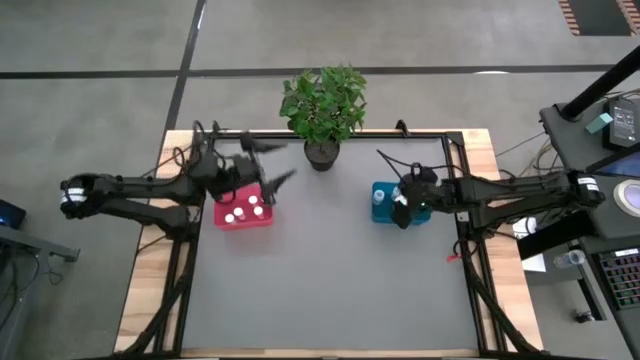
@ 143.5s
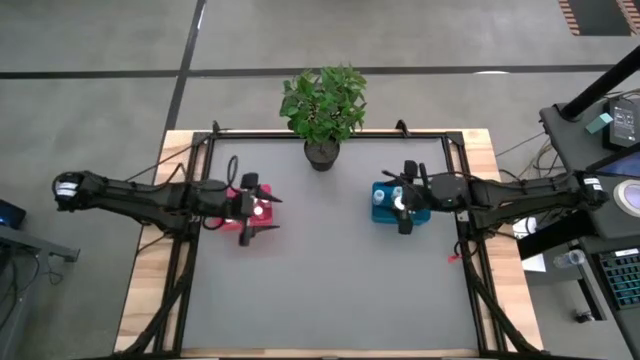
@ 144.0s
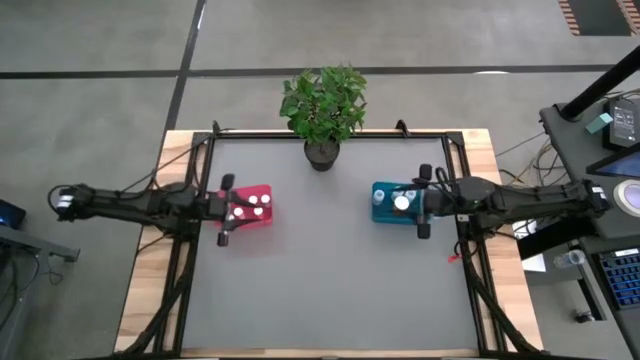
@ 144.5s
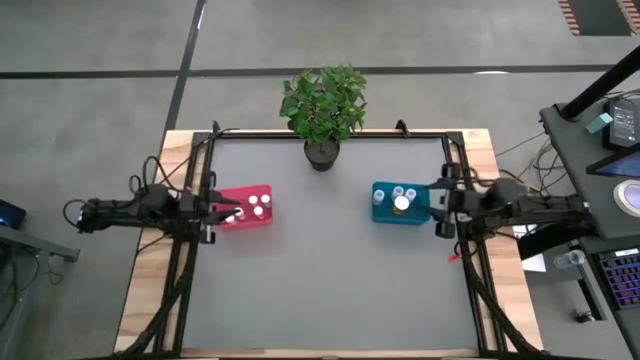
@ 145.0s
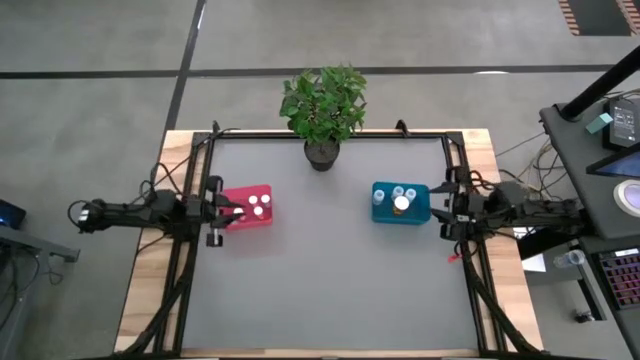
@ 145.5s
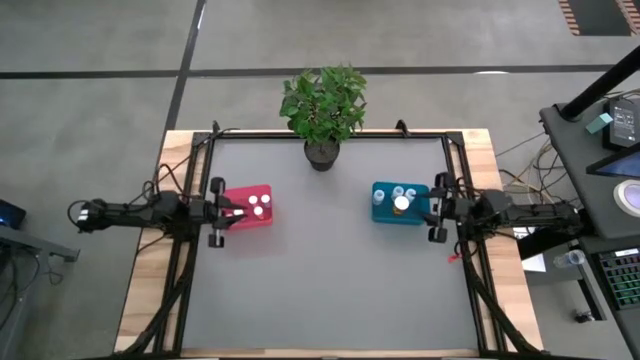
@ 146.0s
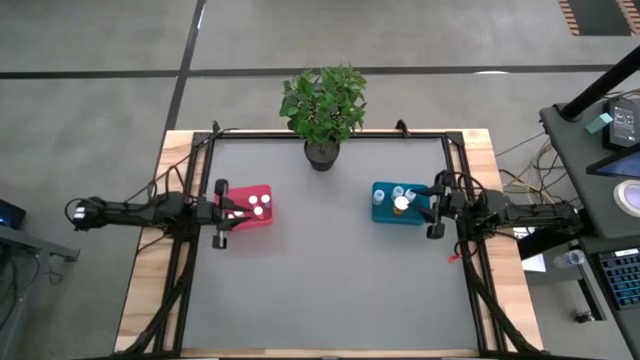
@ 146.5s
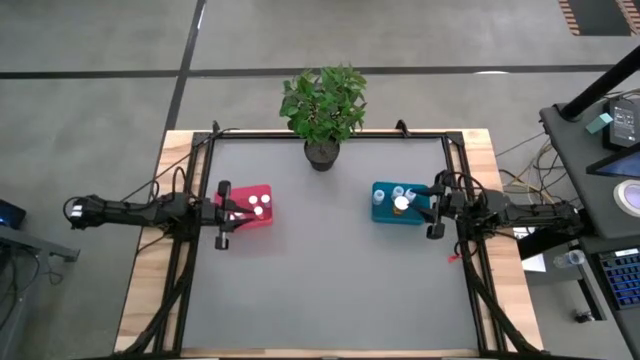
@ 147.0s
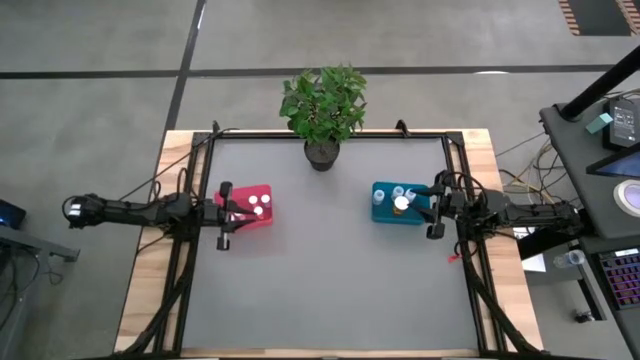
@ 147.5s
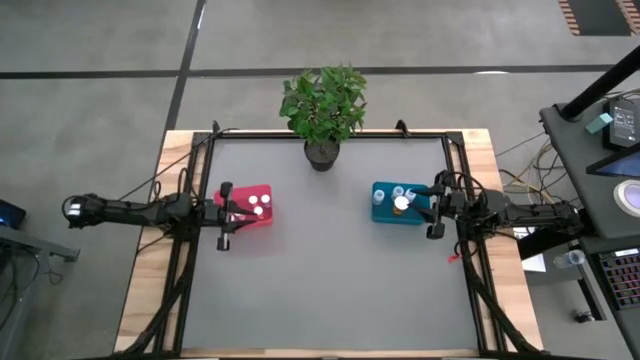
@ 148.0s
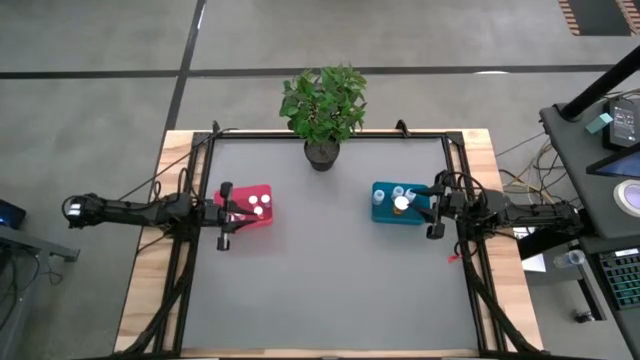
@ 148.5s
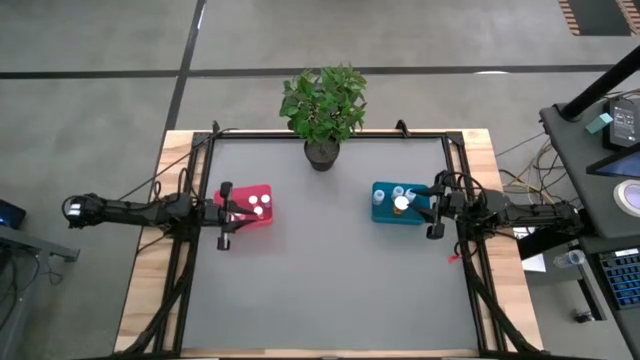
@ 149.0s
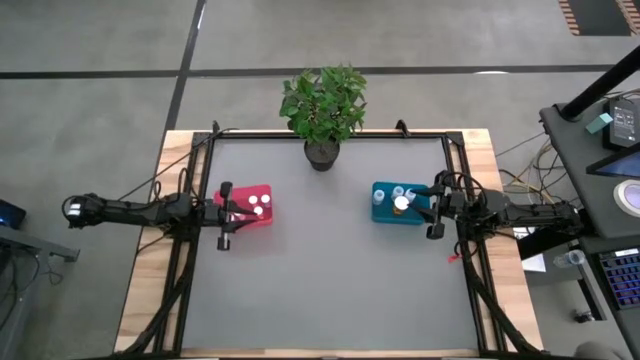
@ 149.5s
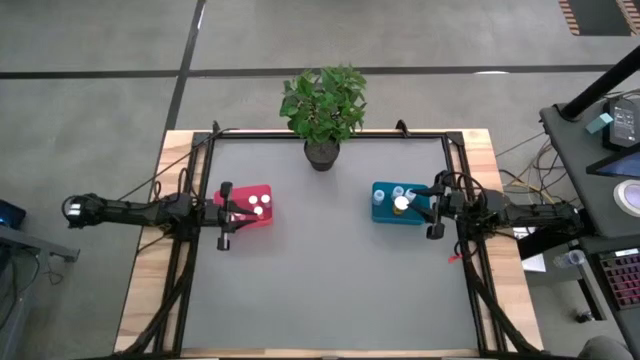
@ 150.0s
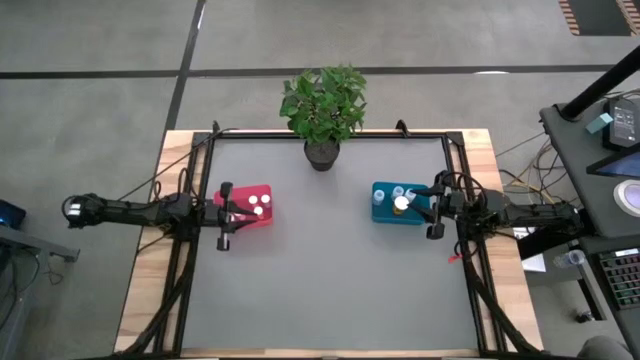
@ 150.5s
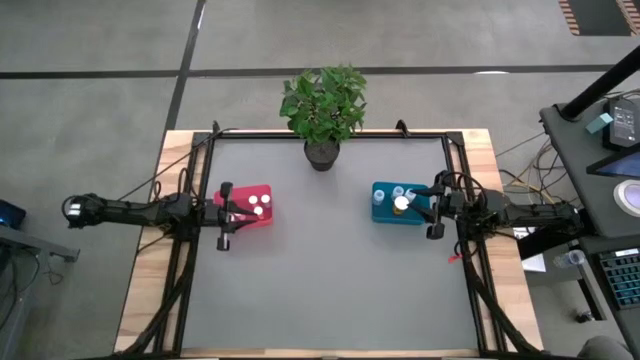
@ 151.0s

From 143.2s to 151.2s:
Task: Pick and place medicine bottles into bin by pill shape (circle, oval)
Return to Home Position

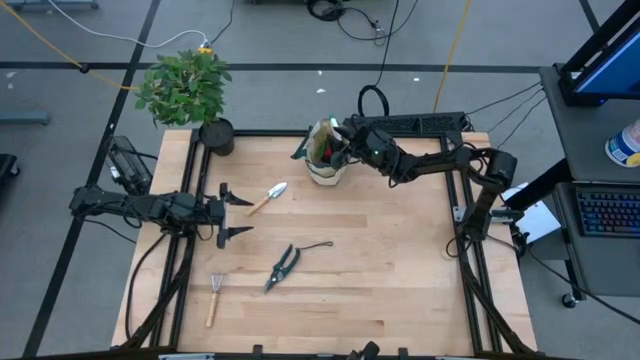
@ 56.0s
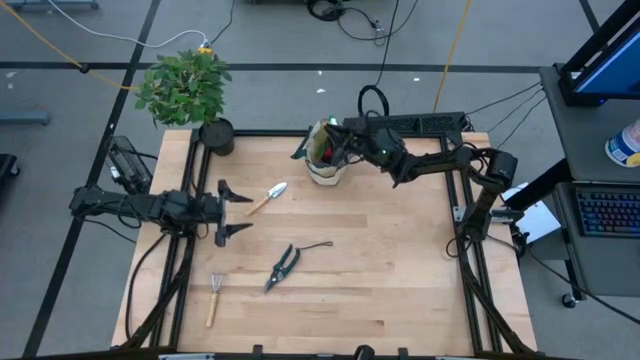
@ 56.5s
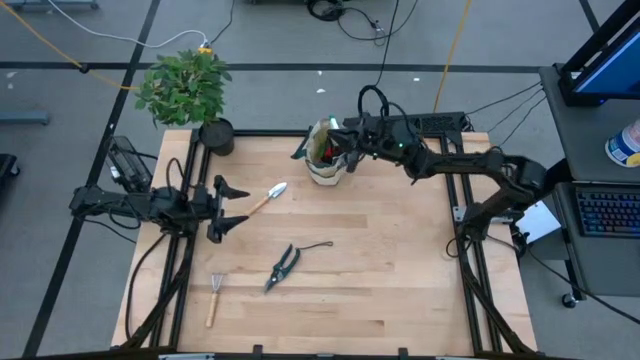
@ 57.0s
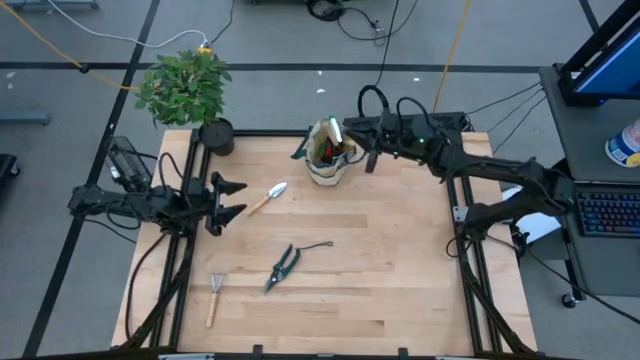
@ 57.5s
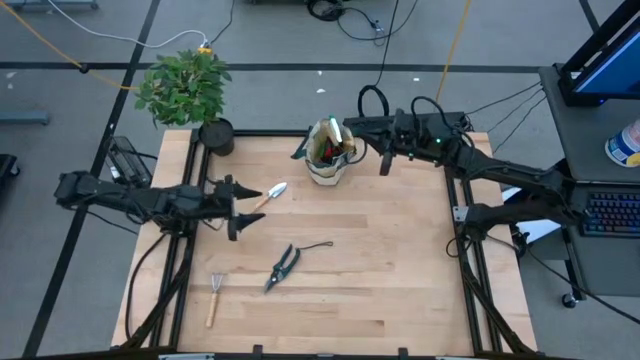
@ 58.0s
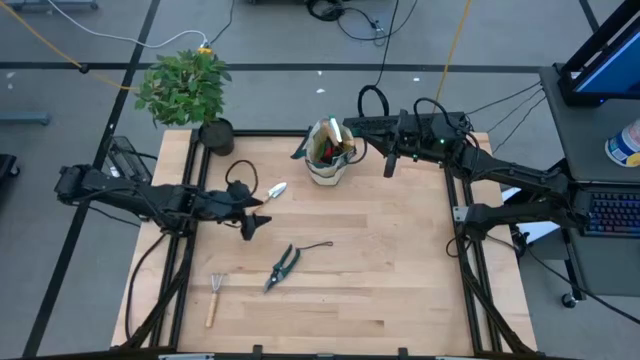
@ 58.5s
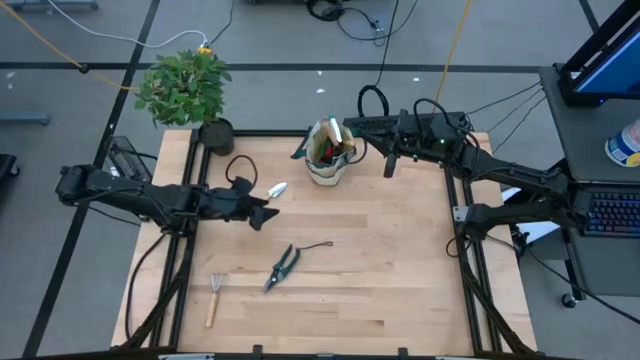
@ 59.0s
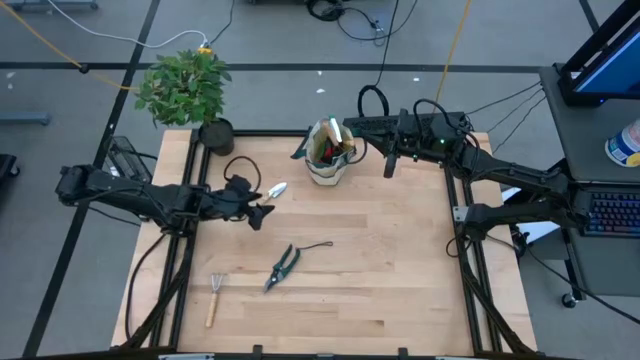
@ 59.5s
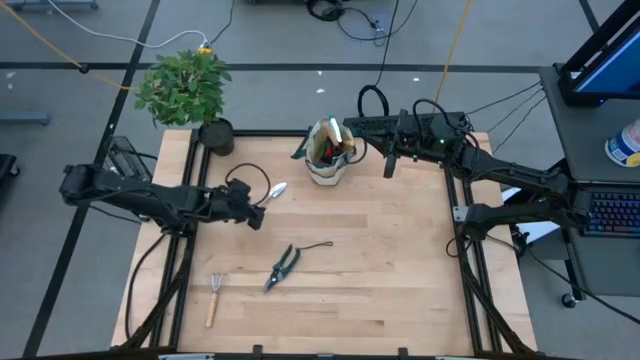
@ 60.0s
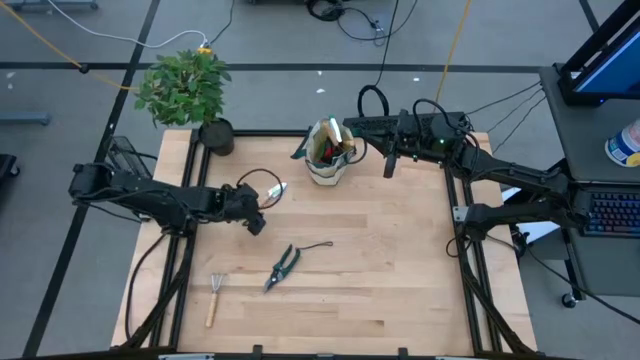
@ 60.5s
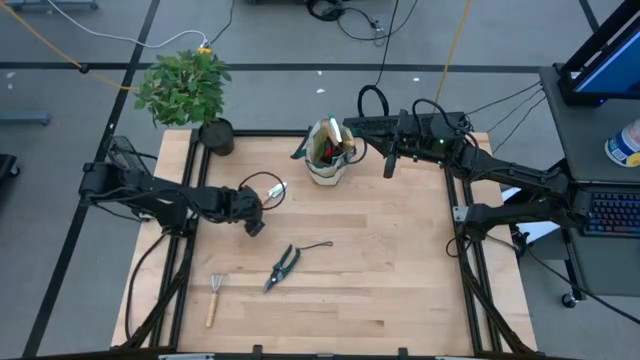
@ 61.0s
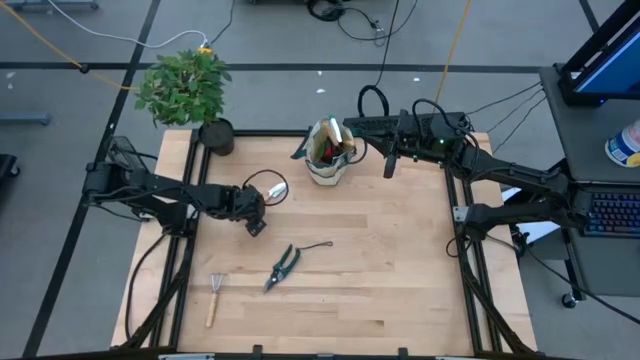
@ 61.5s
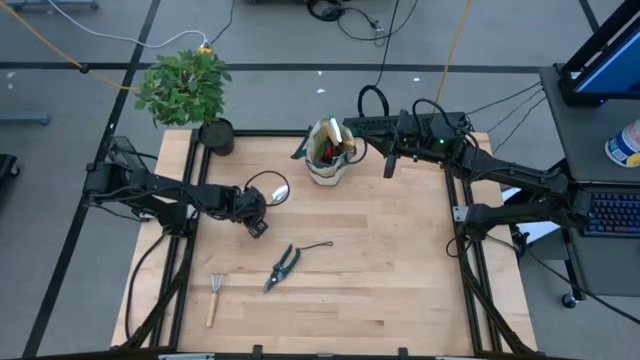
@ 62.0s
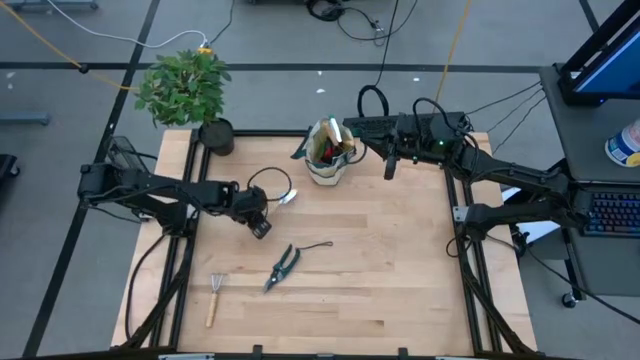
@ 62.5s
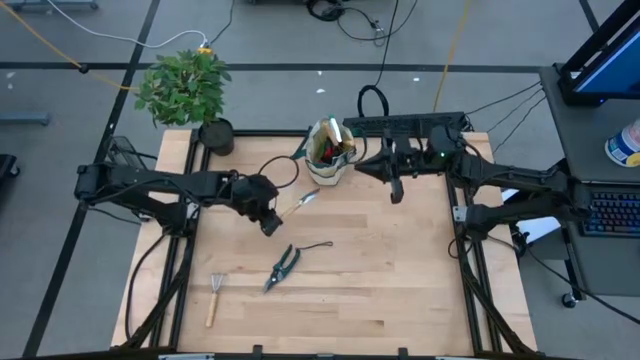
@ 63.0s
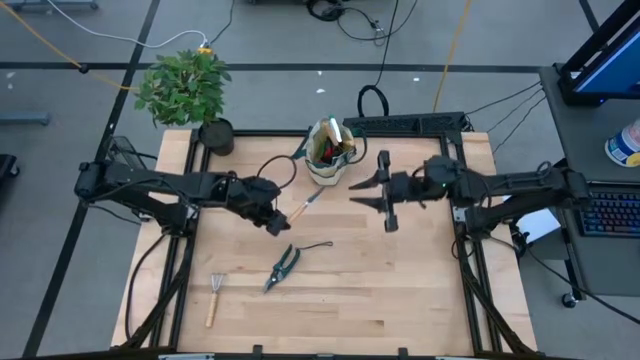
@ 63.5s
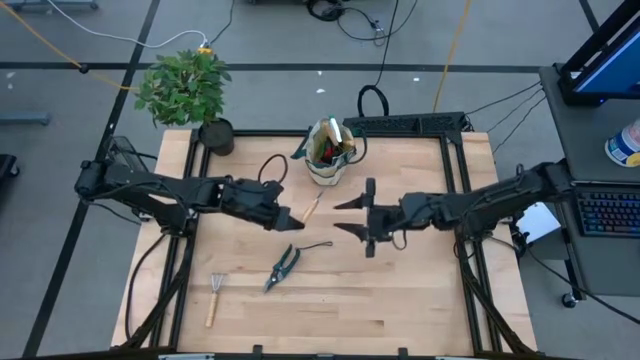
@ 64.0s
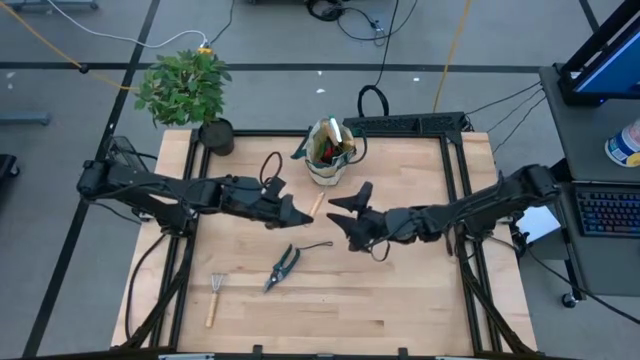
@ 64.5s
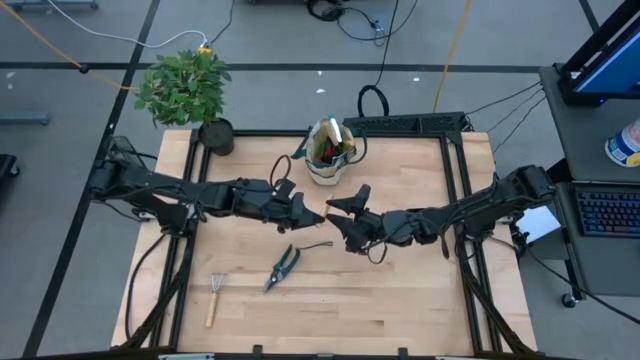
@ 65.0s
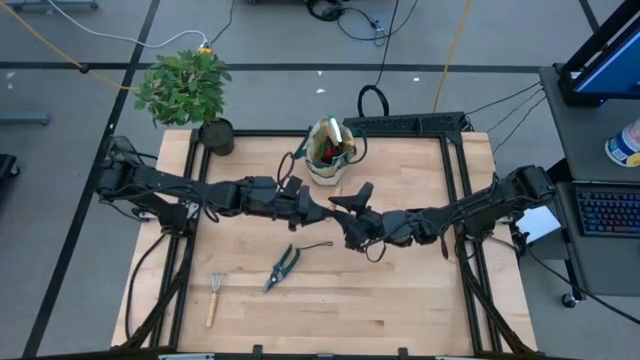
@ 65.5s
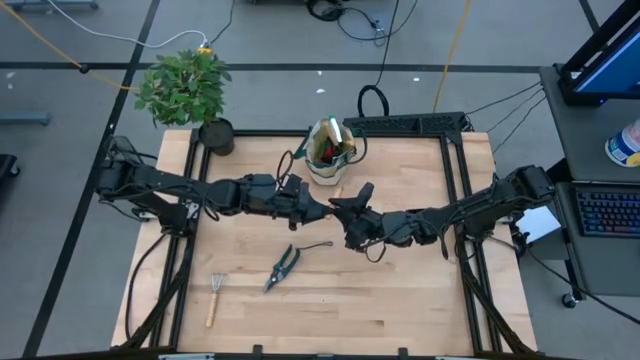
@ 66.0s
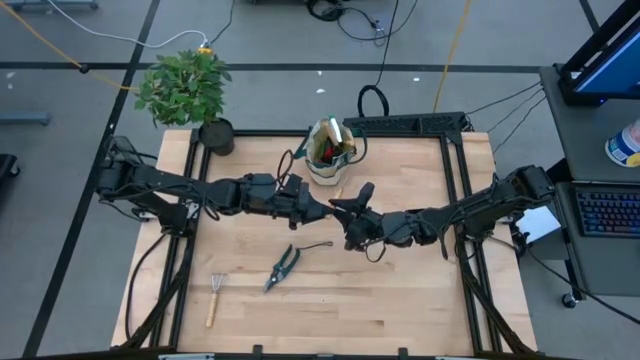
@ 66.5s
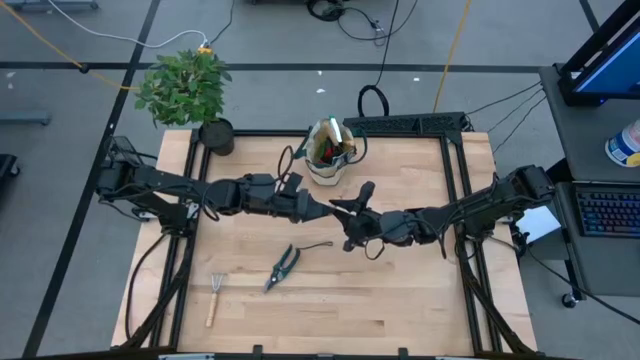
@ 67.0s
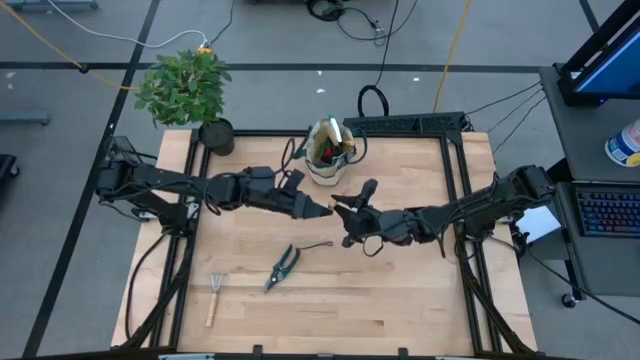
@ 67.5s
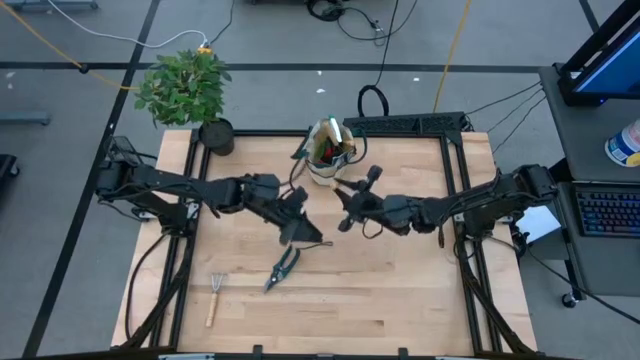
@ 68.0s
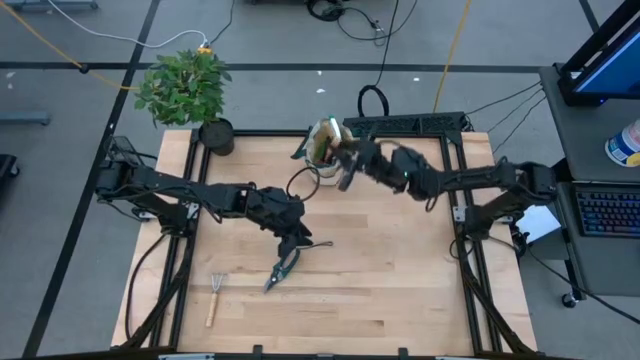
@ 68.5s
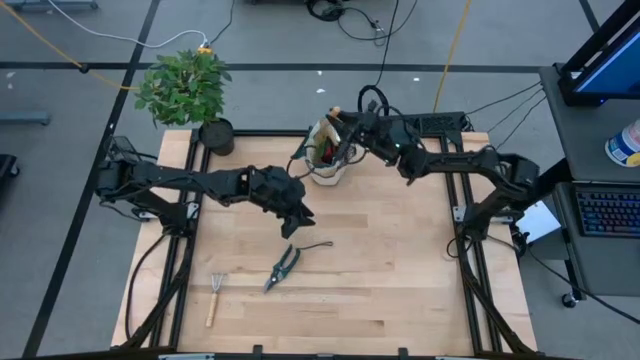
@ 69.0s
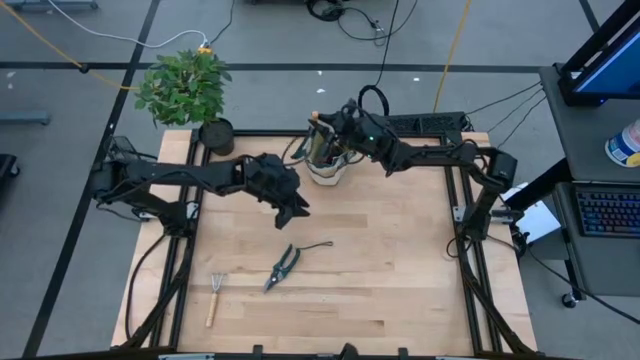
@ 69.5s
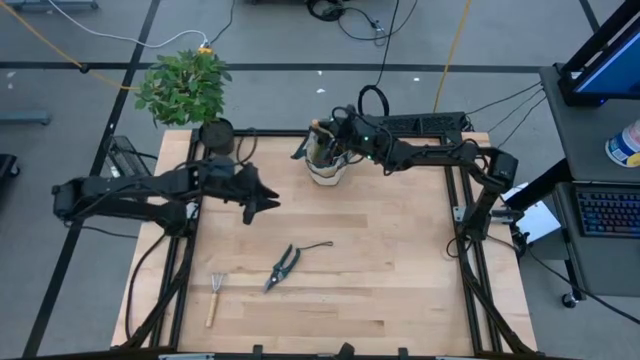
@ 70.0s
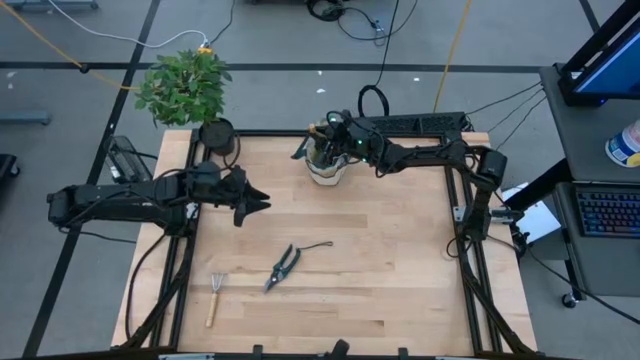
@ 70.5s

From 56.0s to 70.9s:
Task: Pick & Place Garden tools in Gardening bag
Put the brown trowel into the brown gardening bag
